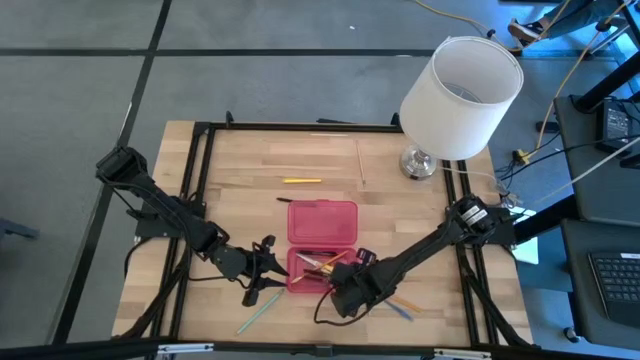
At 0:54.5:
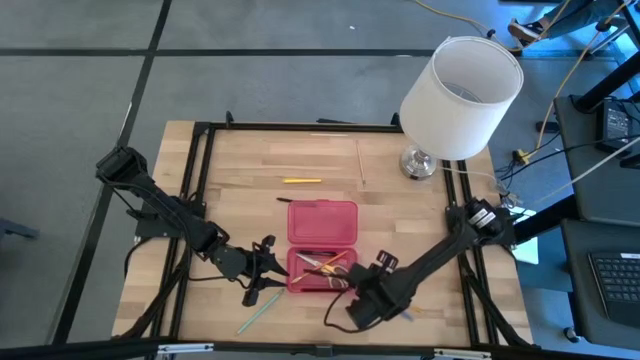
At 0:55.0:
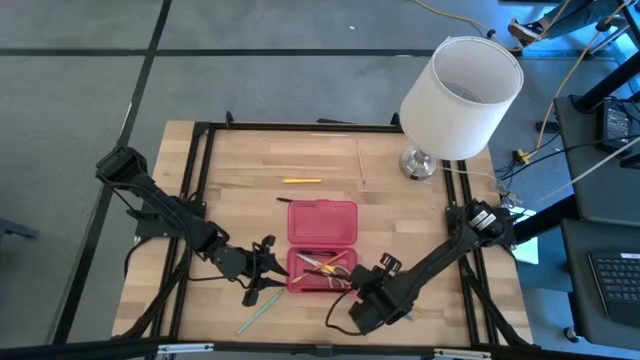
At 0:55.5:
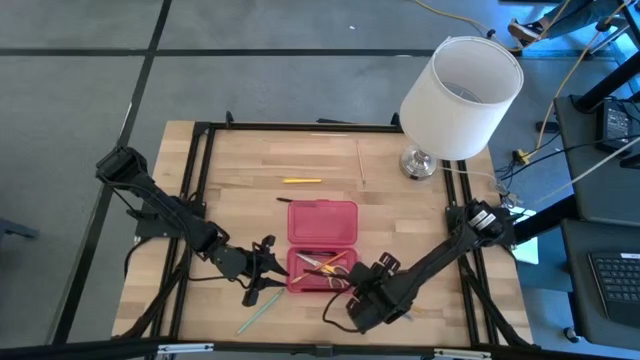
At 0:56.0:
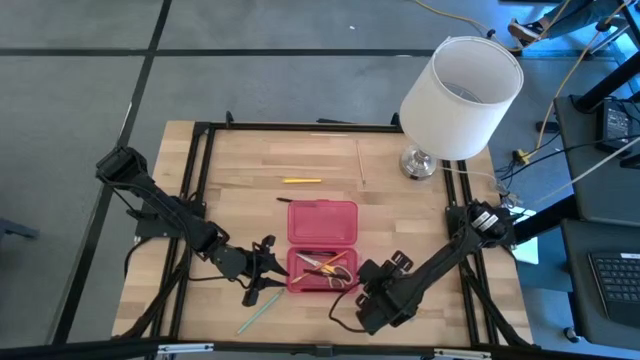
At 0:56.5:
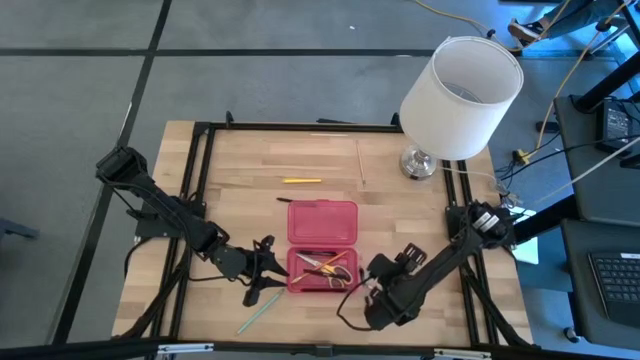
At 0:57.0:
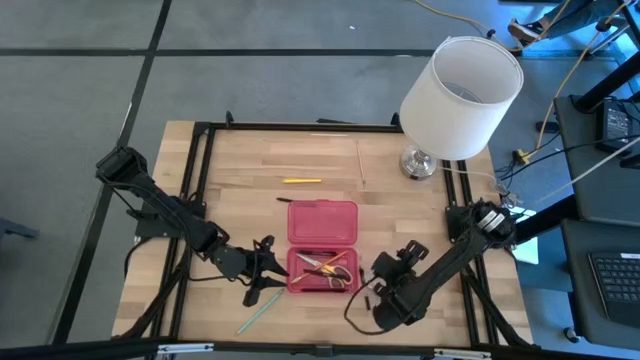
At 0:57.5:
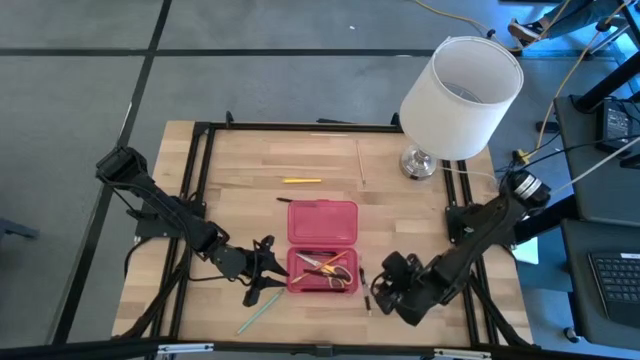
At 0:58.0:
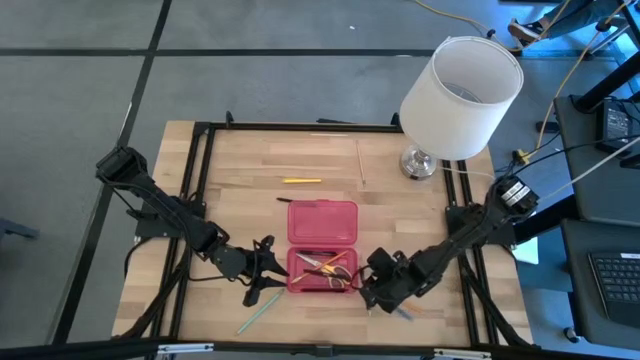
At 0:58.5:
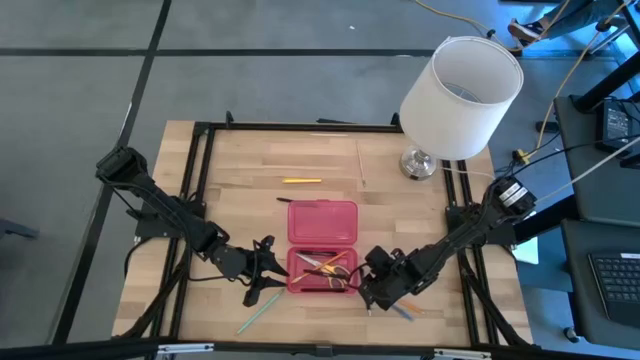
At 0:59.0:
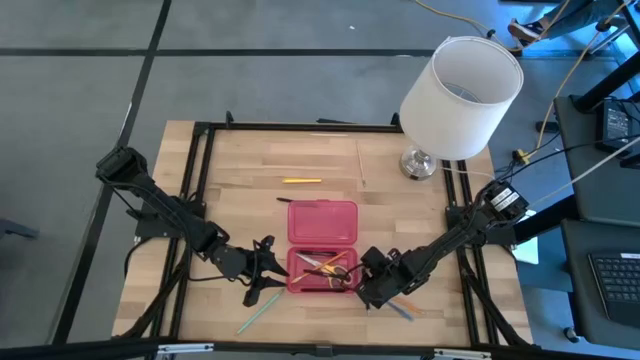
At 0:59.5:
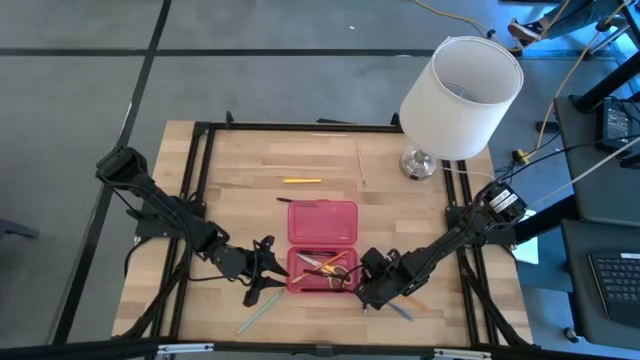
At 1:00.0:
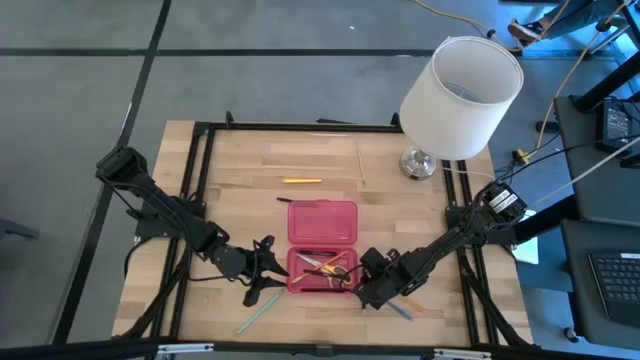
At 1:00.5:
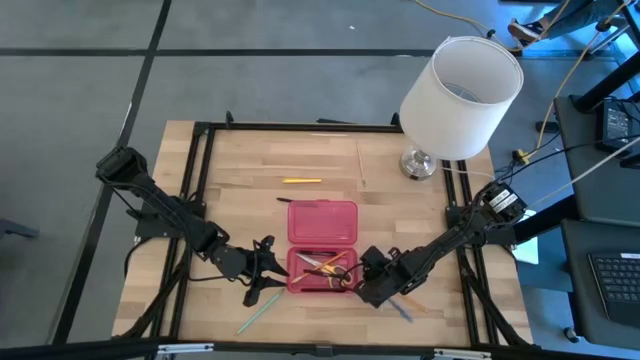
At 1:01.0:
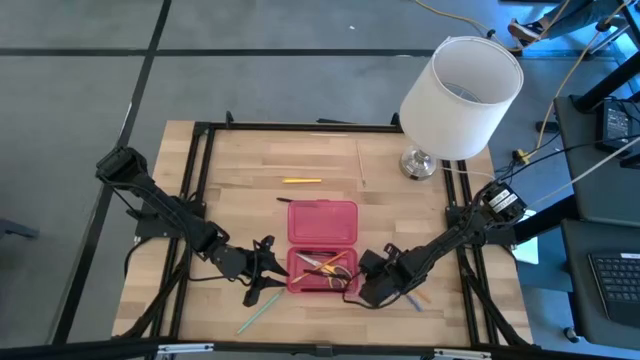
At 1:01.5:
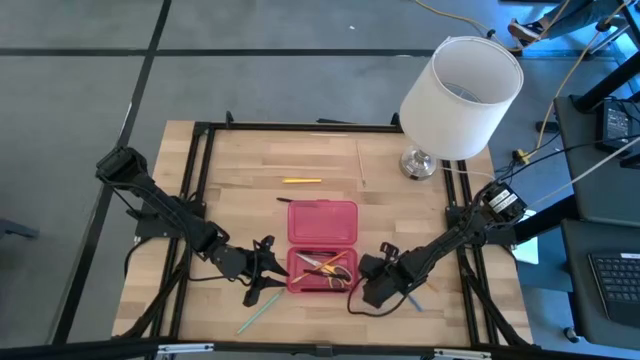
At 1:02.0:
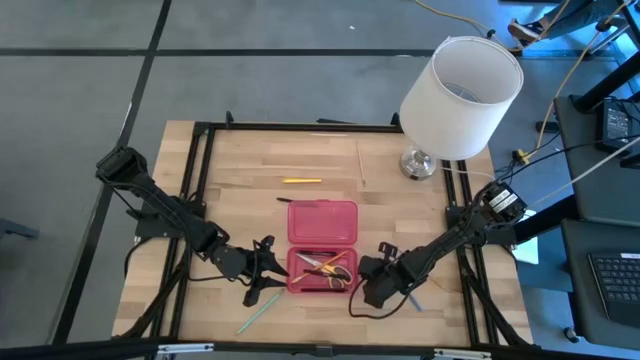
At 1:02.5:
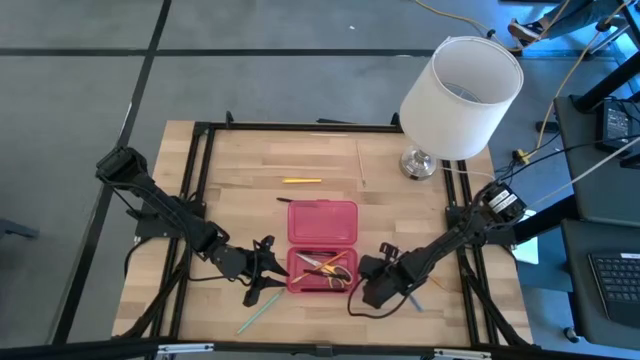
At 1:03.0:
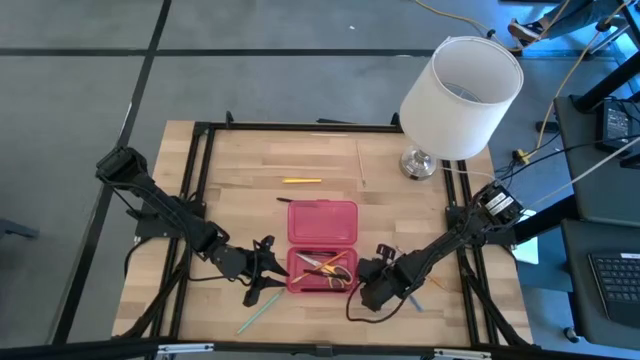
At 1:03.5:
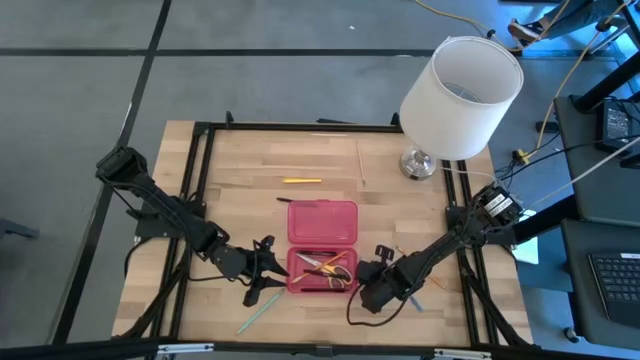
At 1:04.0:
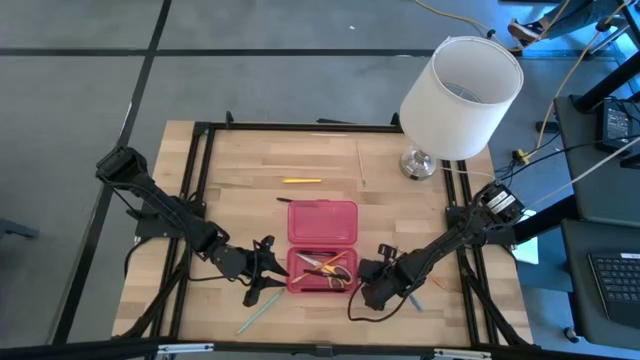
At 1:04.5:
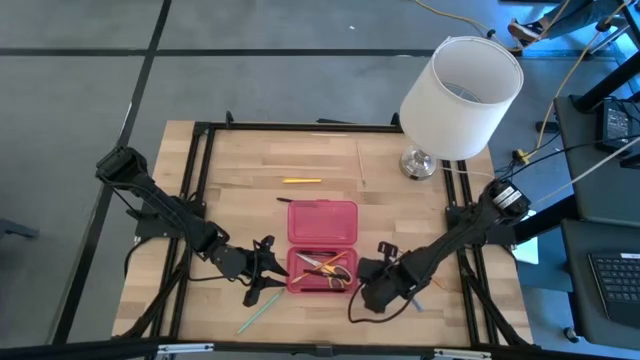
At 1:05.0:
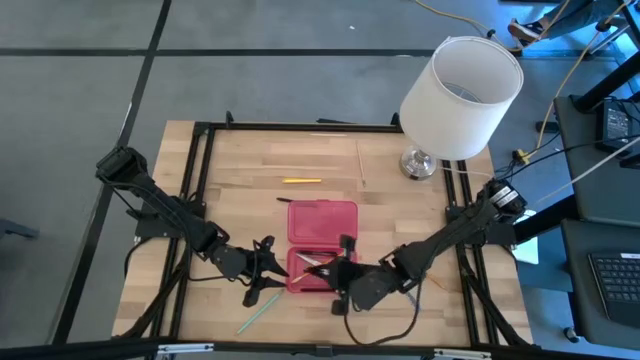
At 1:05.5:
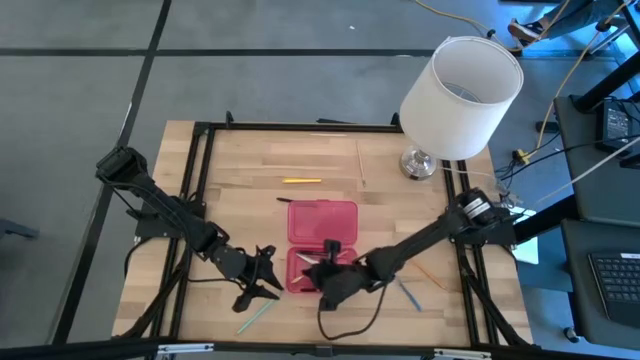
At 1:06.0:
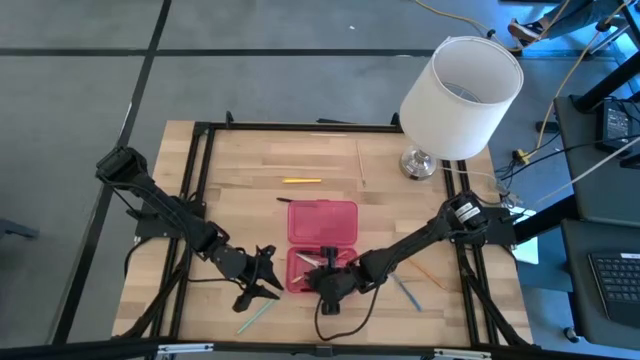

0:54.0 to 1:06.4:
Task: Pick & place school supplies into a supply box
Put the black pen into the red supply box

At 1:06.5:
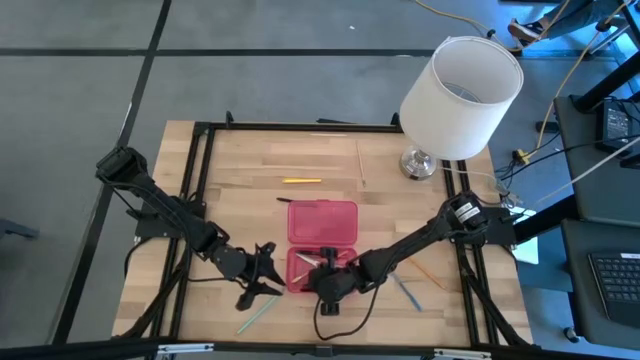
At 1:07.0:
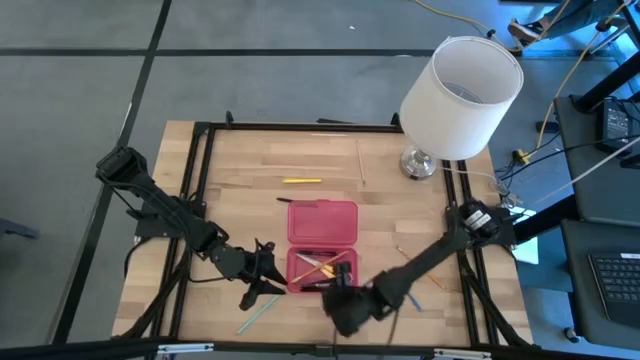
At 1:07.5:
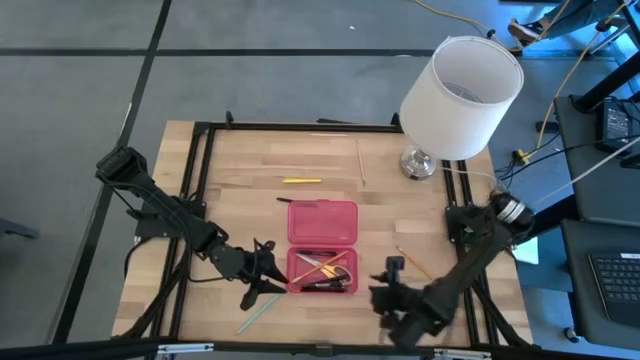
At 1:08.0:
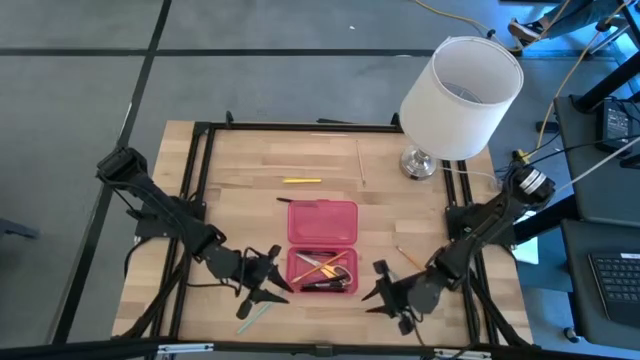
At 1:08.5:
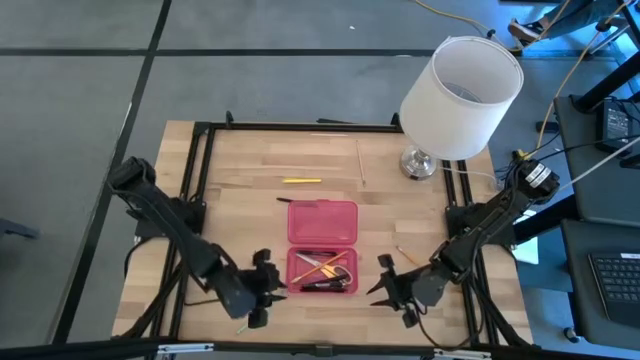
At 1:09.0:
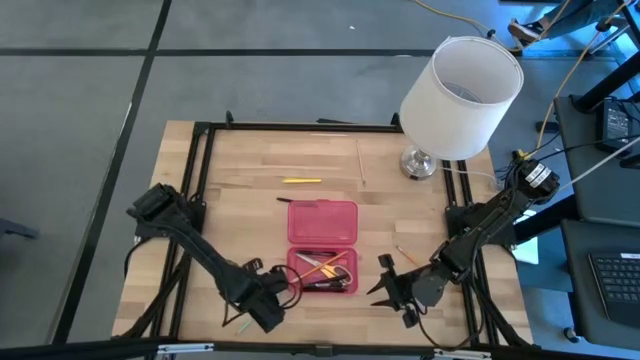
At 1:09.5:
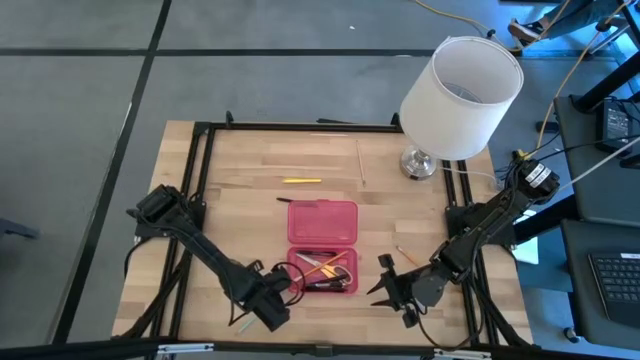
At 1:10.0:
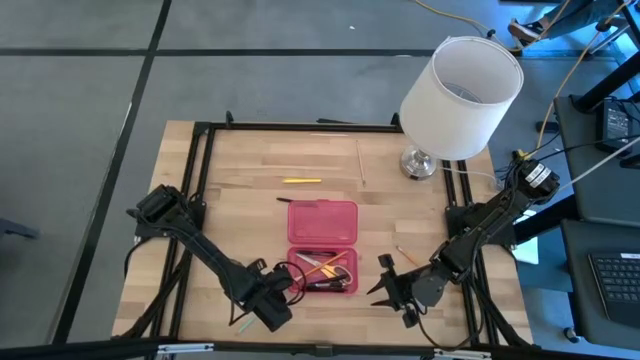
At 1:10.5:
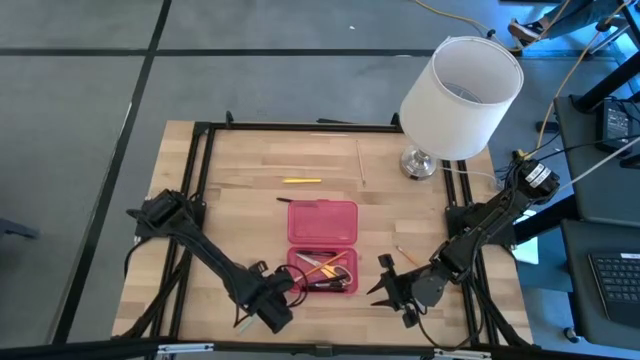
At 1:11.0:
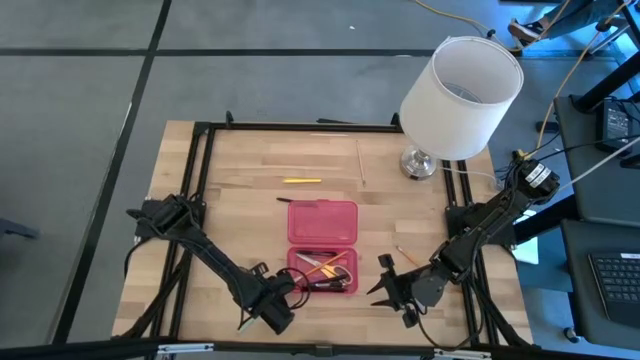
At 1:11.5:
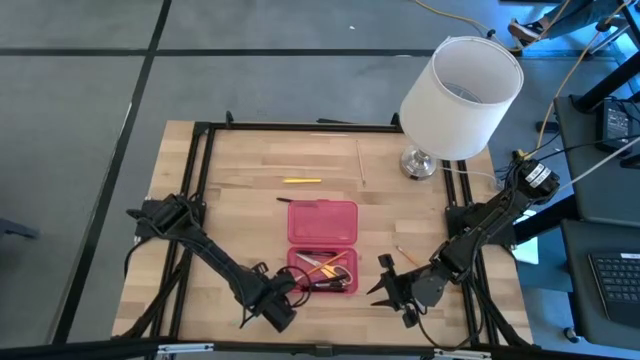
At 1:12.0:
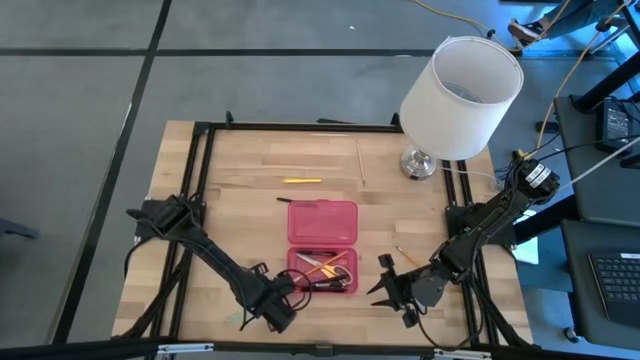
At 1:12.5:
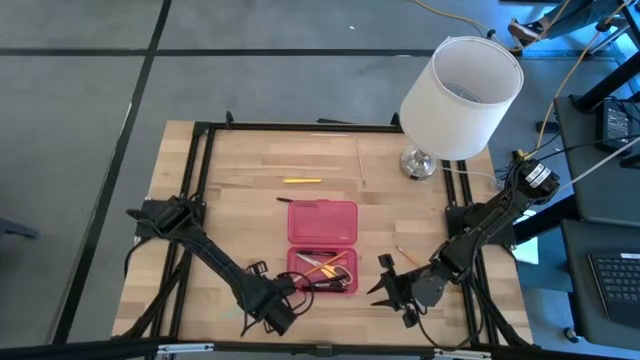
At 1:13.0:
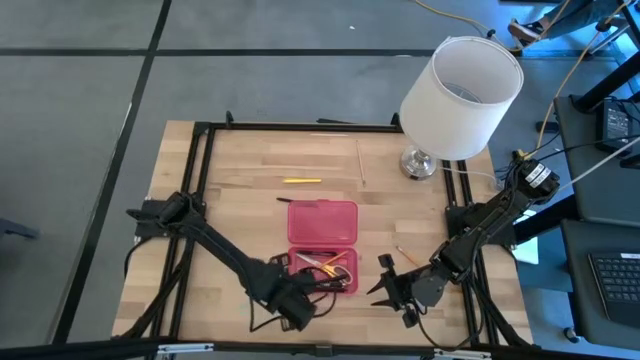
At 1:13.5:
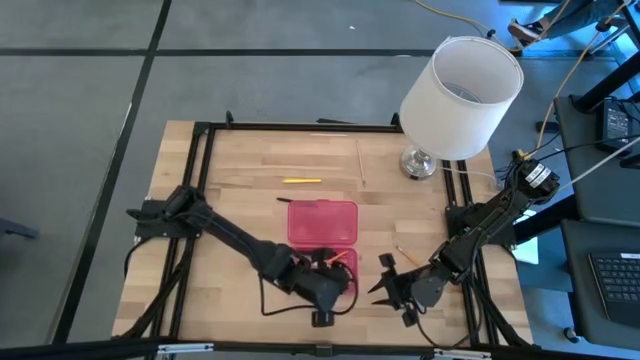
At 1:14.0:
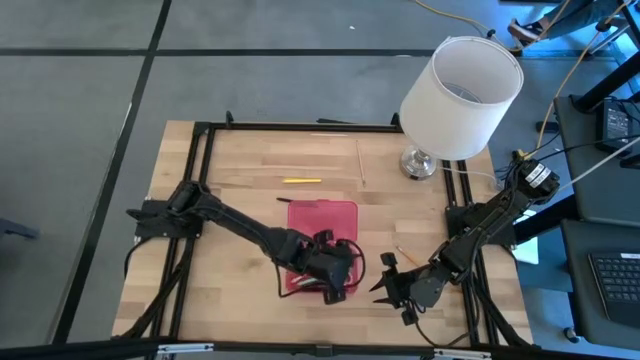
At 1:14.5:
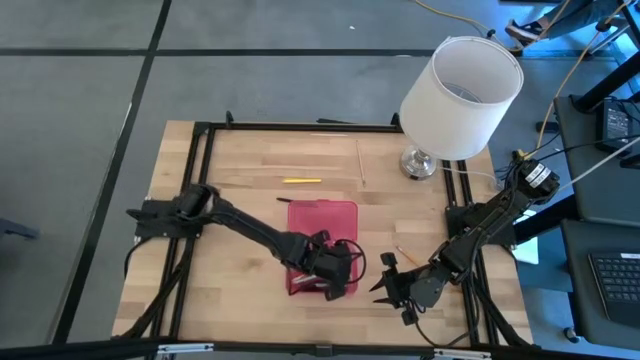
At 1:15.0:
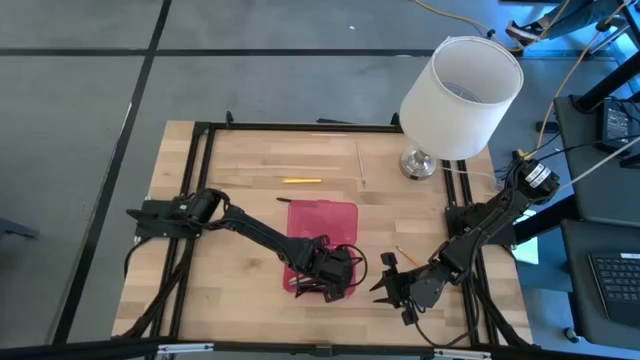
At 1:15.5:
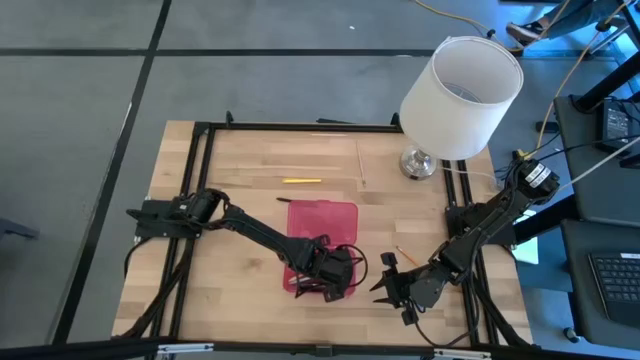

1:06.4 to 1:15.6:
Put the blue pencil into the red supply box
